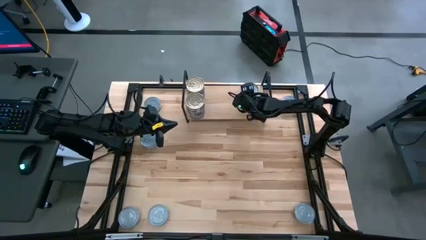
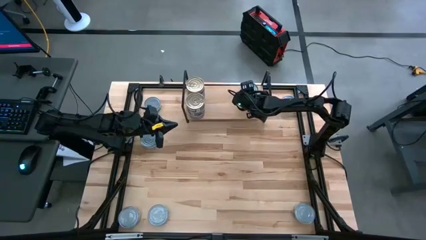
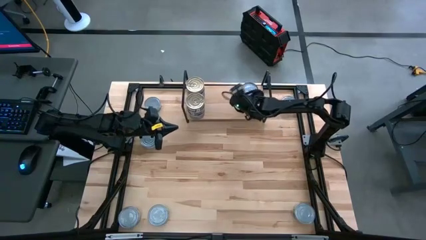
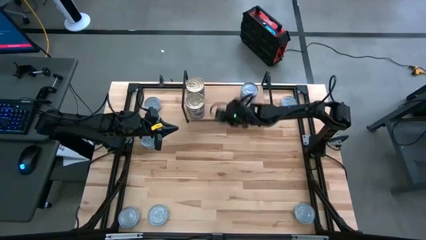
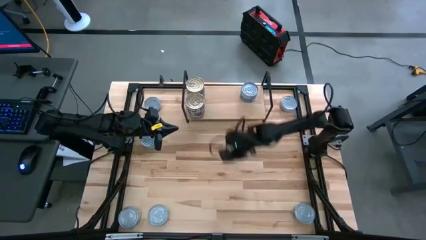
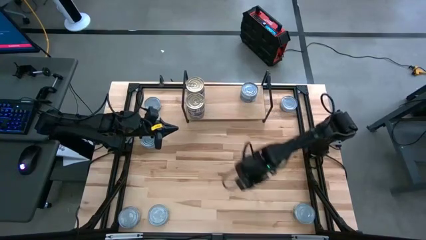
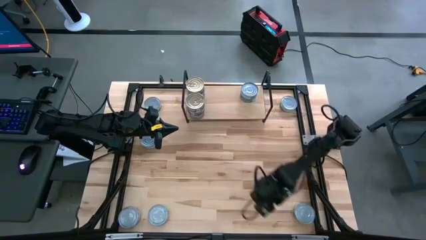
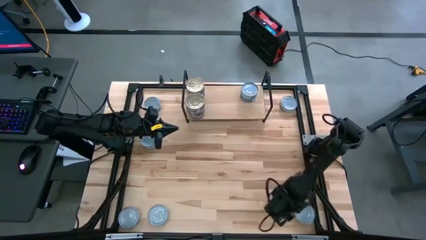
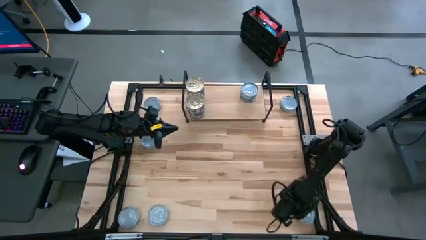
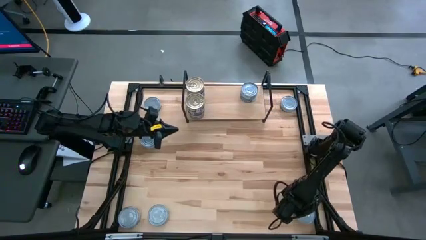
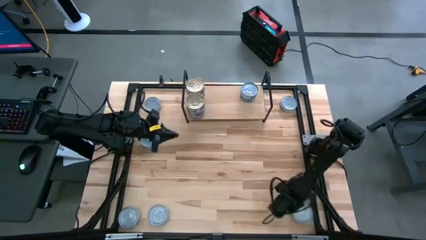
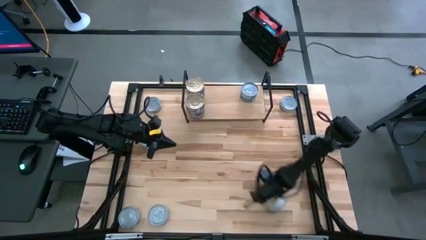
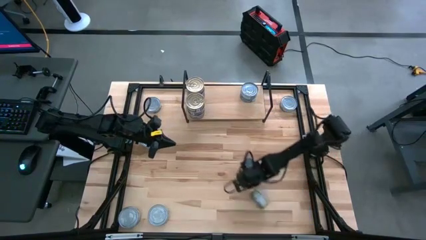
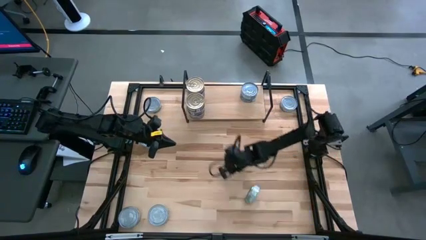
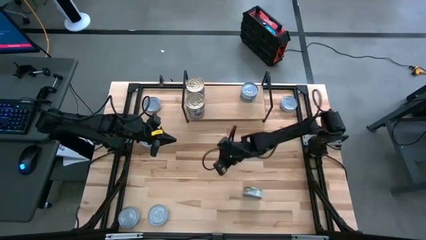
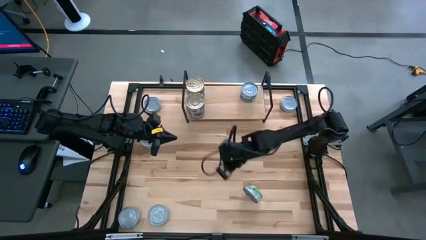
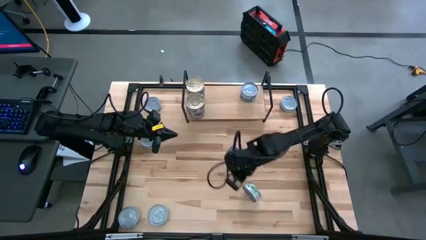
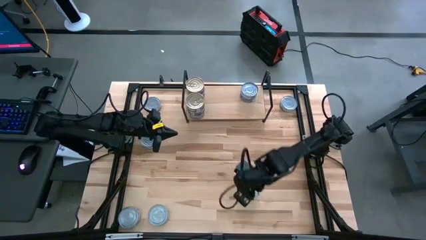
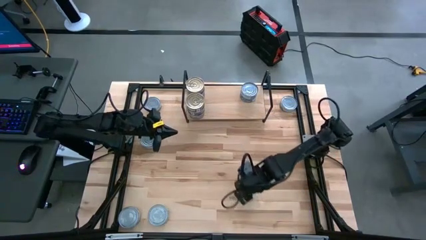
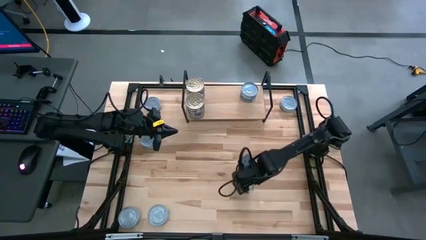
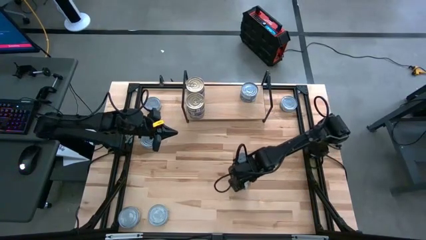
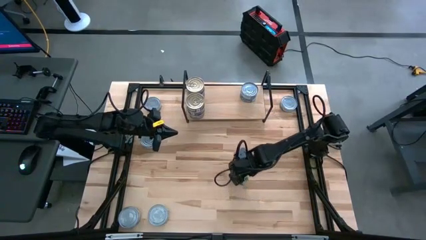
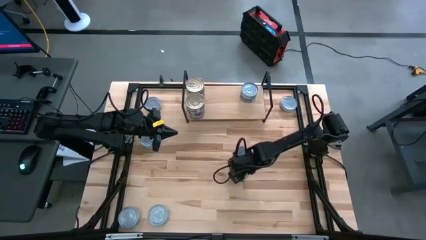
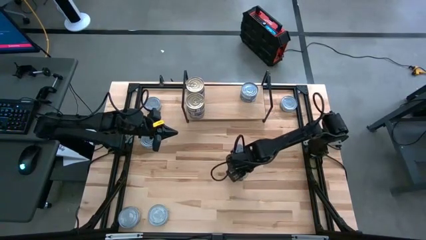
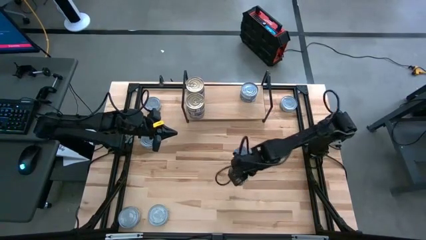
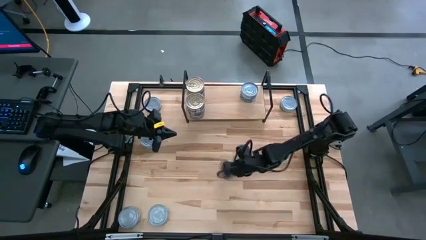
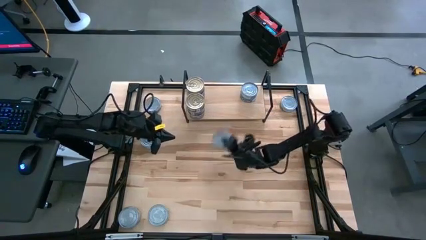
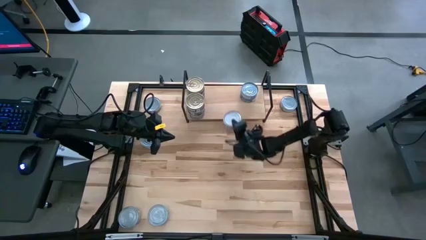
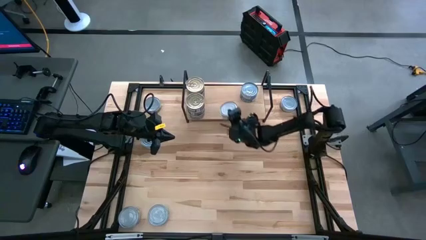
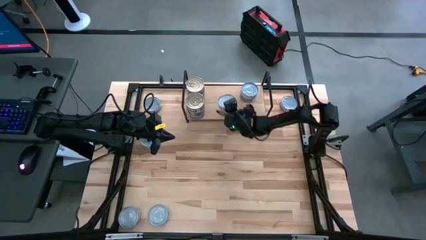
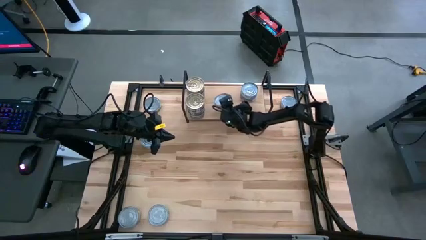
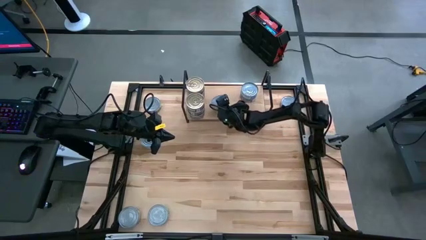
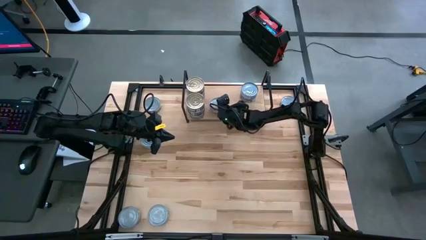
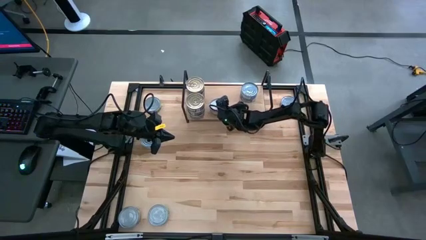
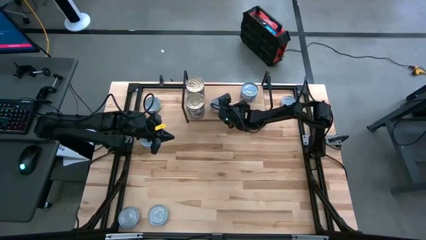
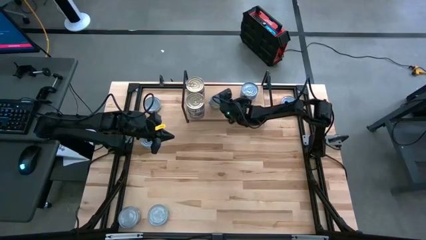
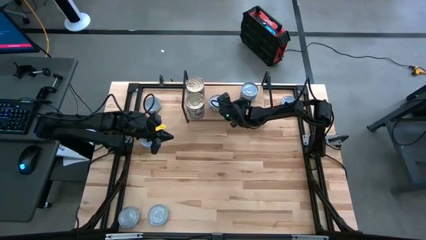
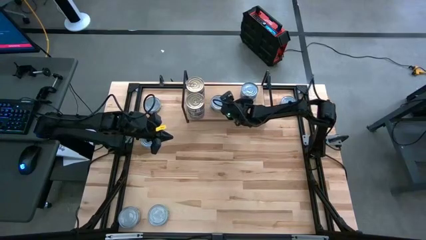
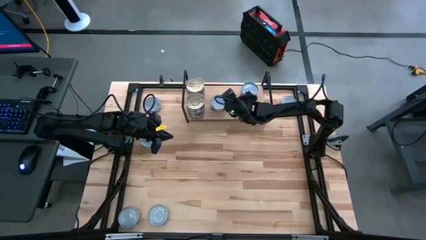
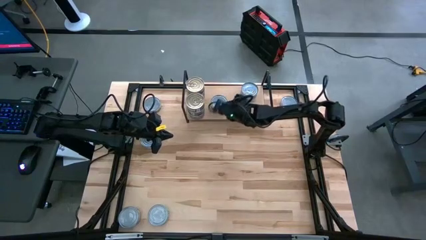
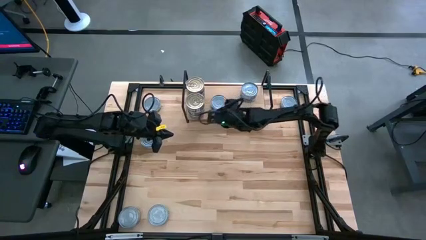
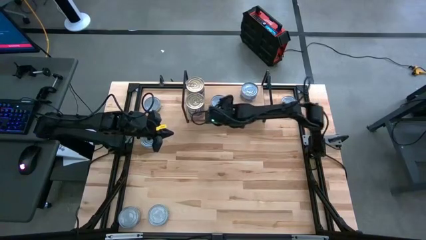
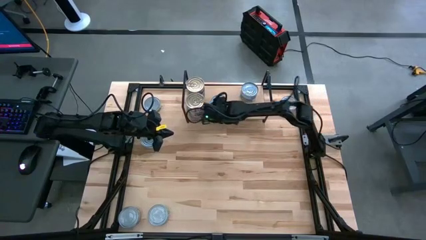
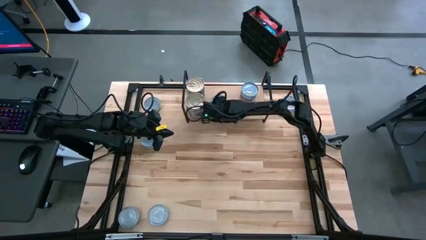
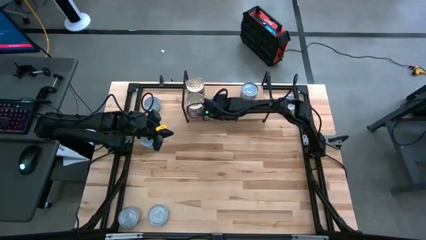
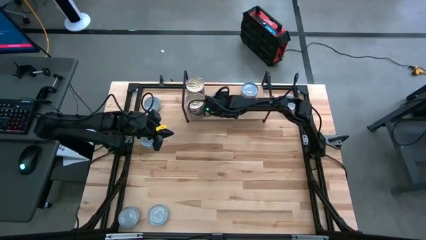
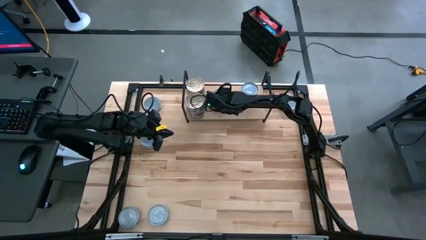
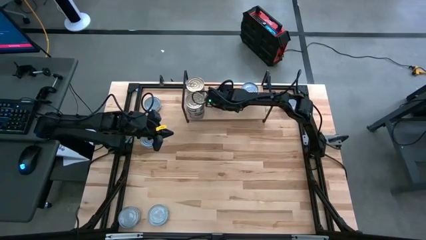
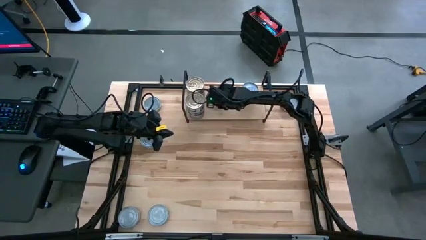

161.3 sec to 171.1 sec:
Task: Stack canned seafood by type on shelf
Put the green white tuna can on the shelf

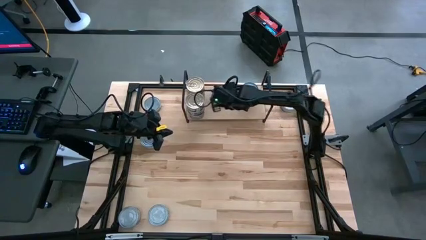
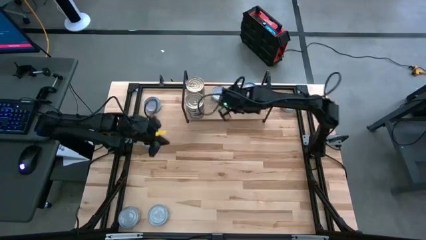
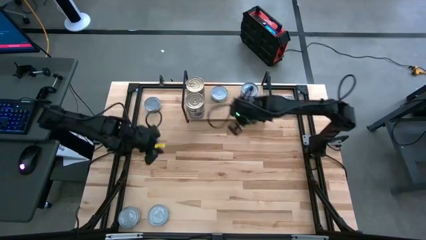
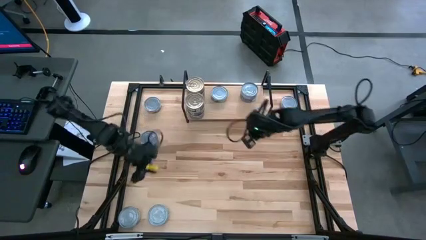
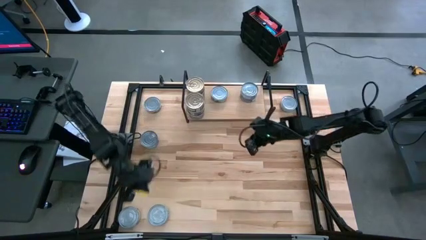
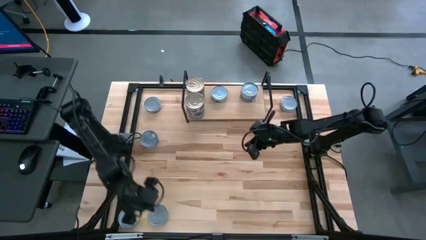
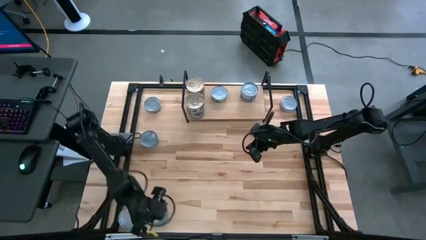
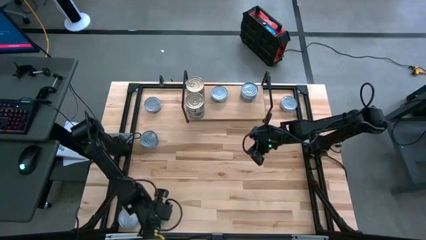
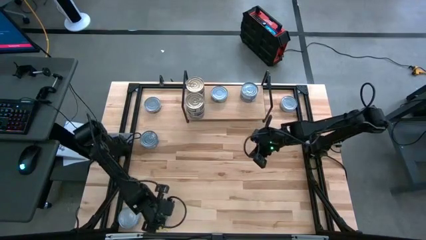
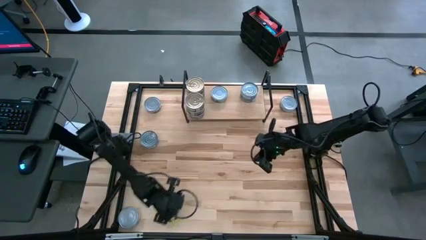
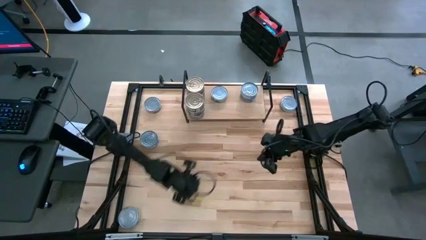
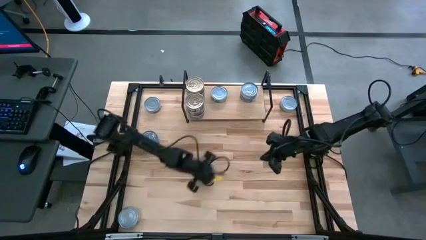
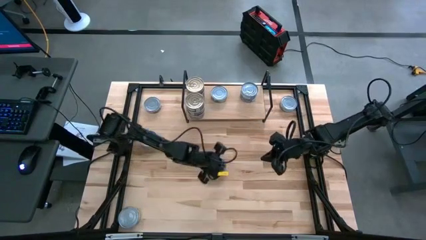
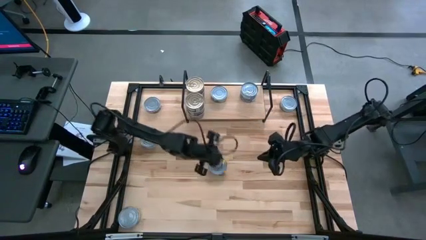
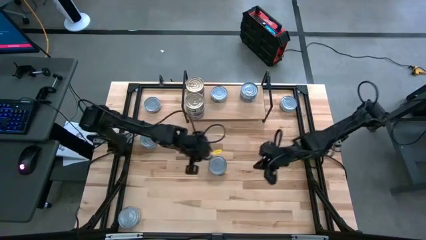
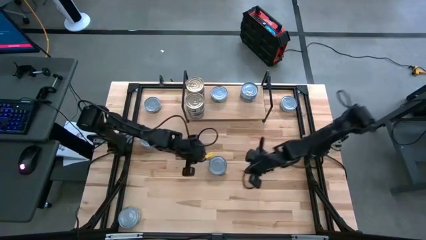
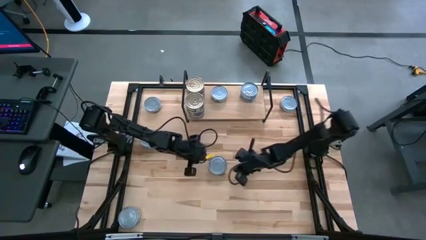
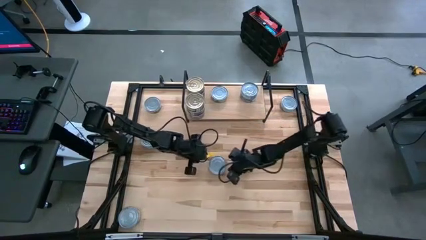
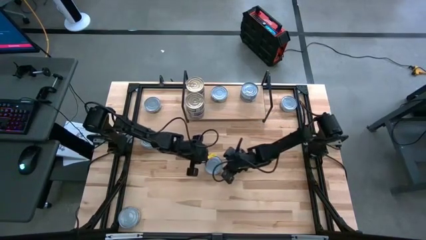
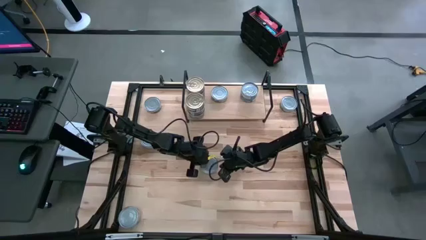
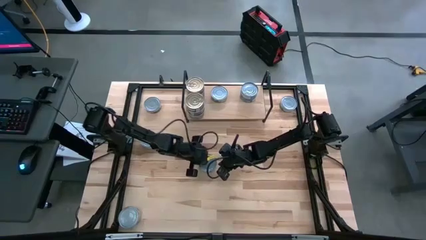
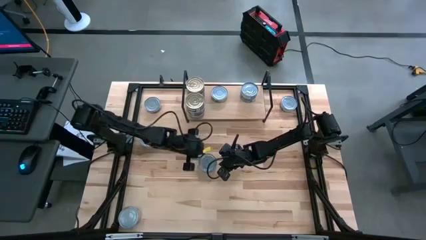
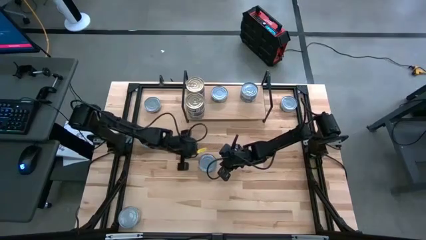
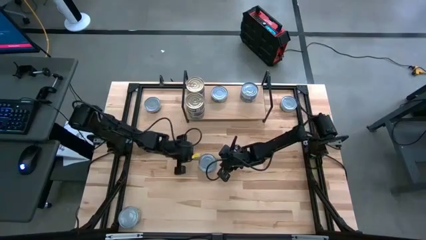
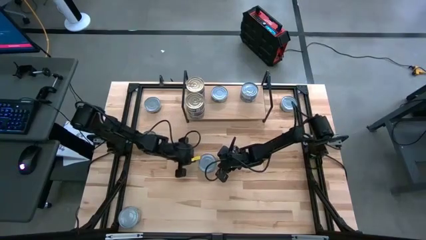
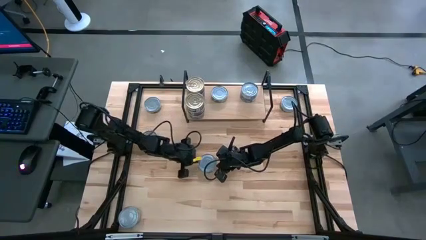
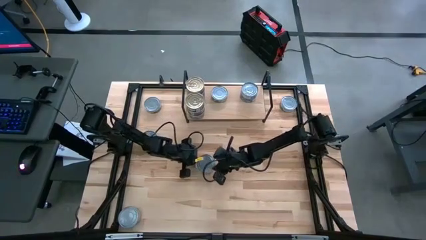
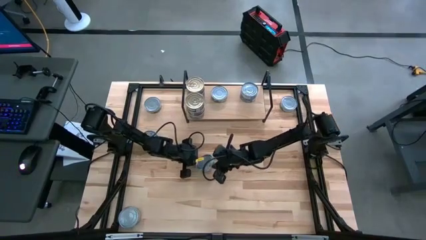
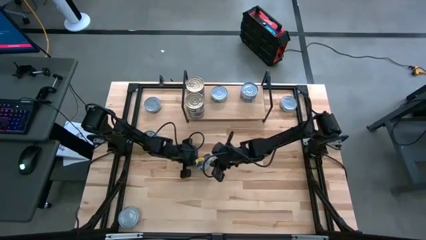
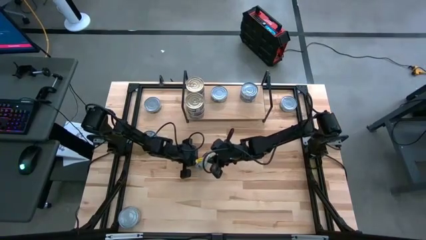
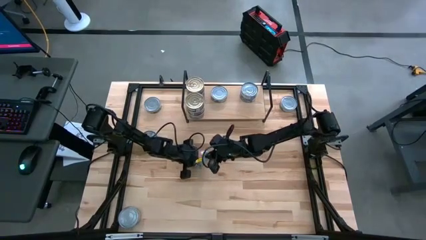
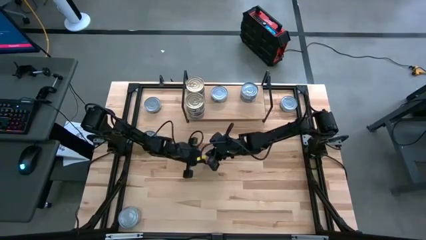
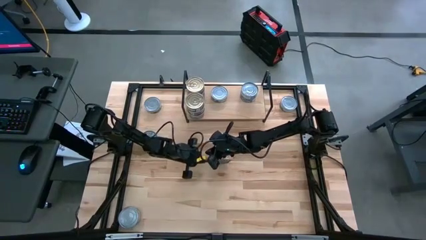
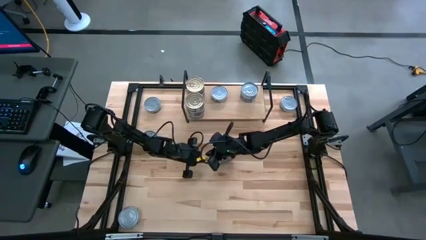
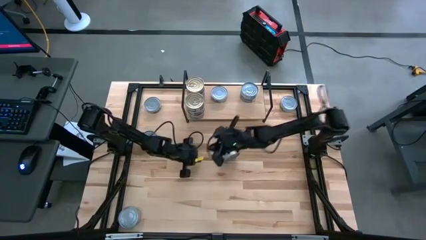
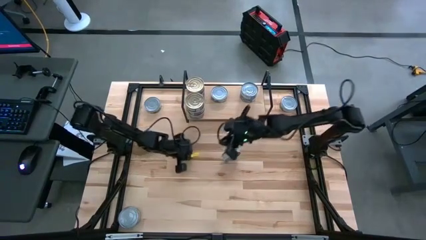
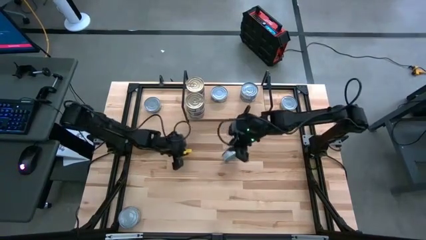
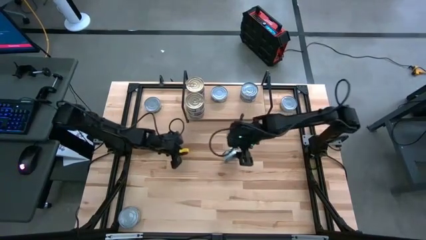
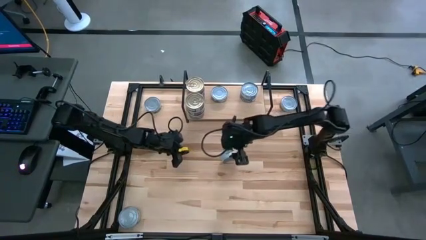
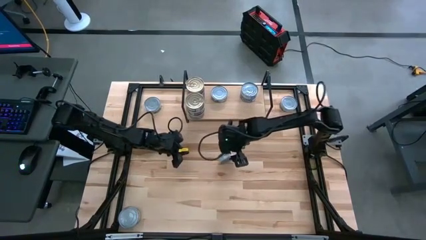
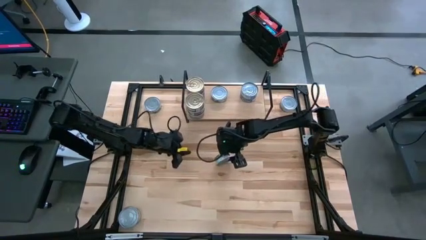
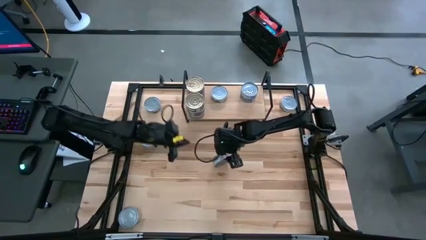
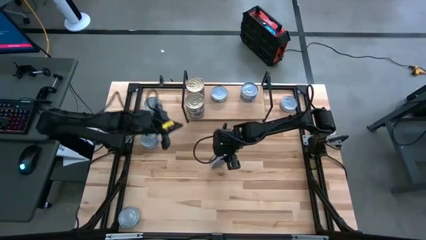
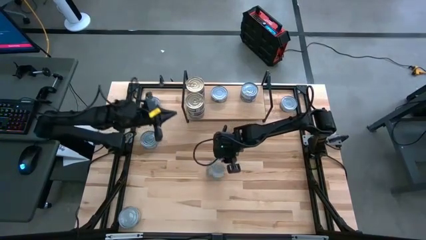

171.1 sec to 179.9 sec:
Put the green white tuna can on the shelf
